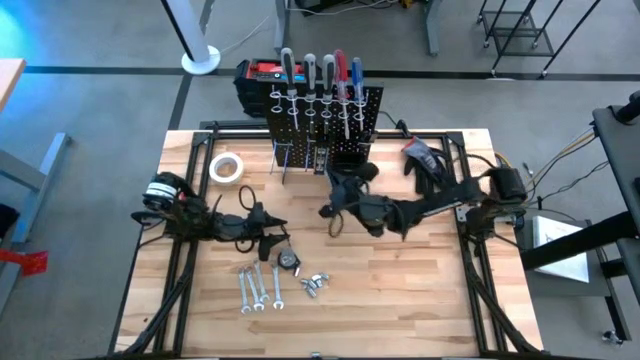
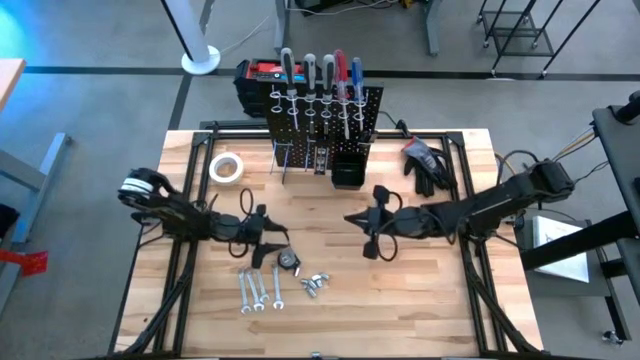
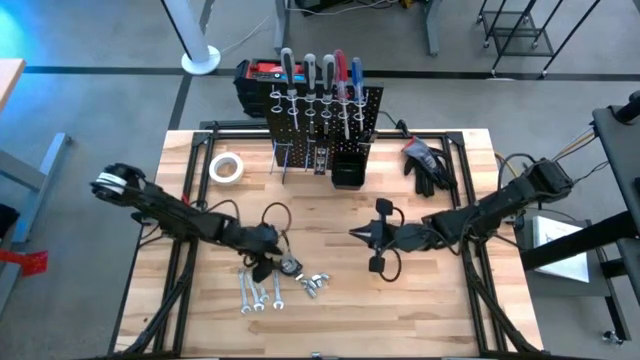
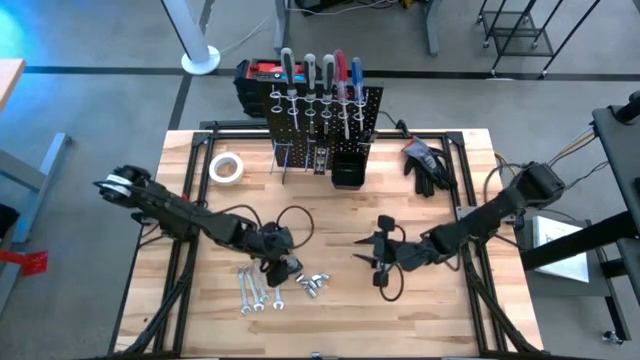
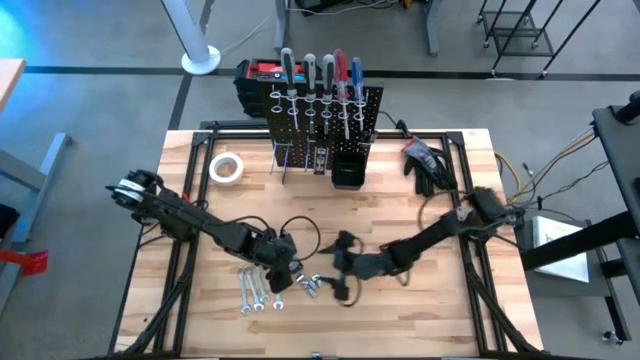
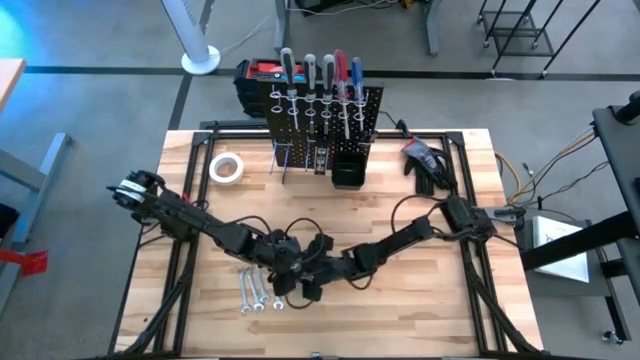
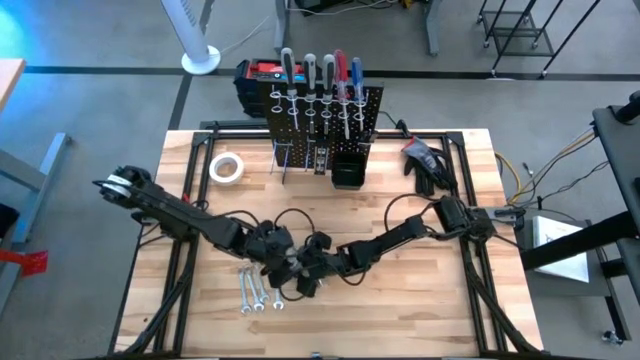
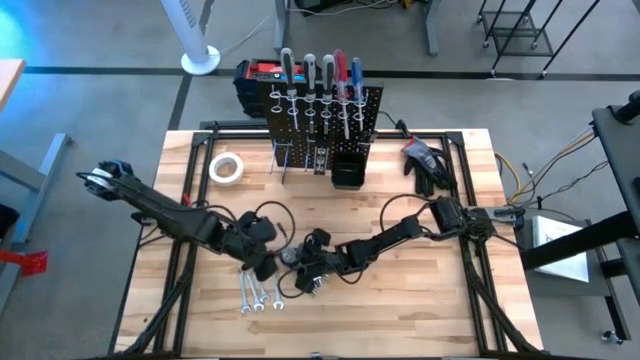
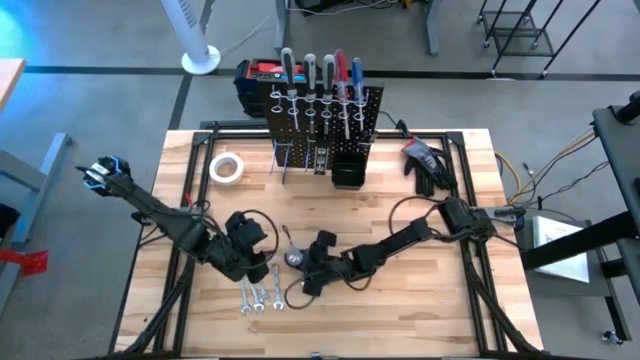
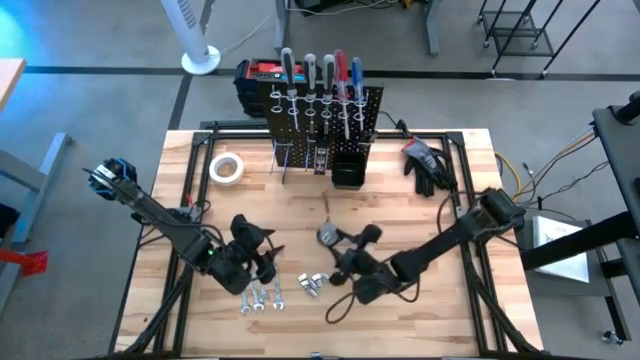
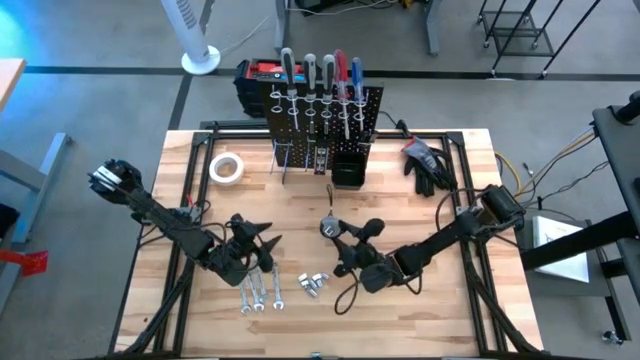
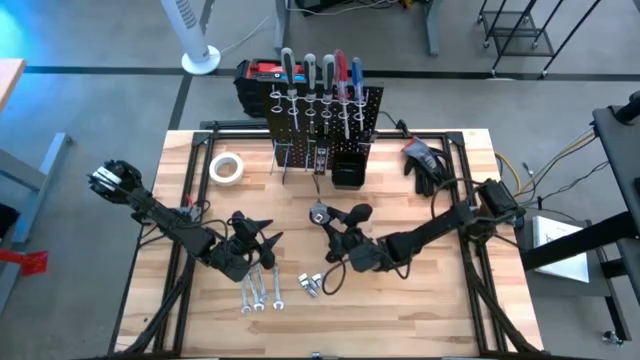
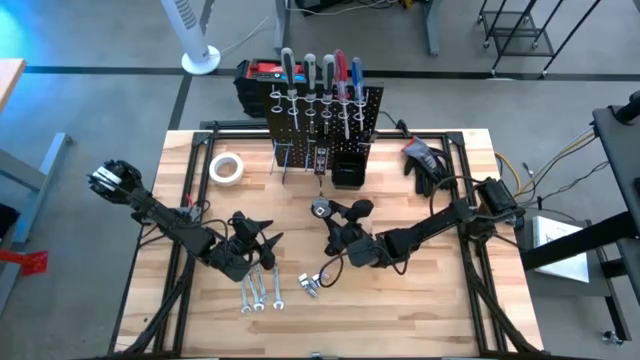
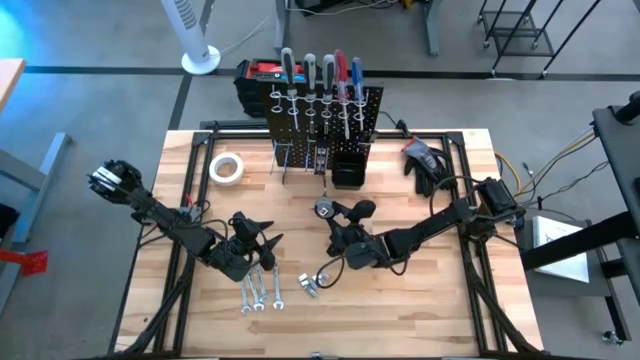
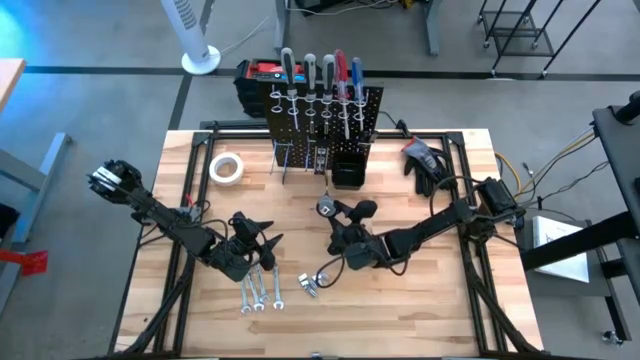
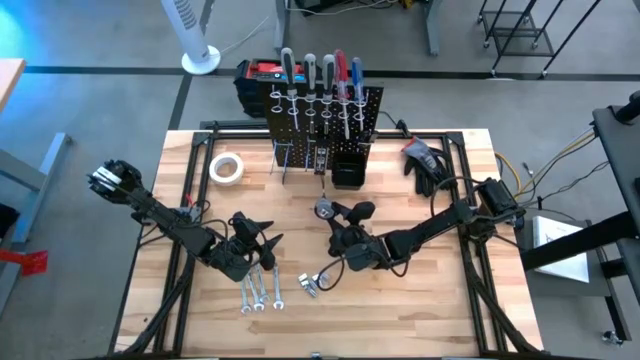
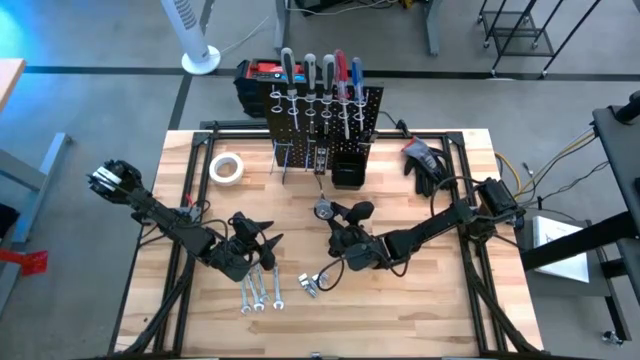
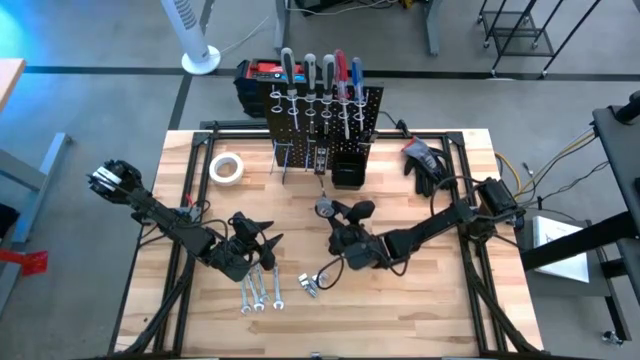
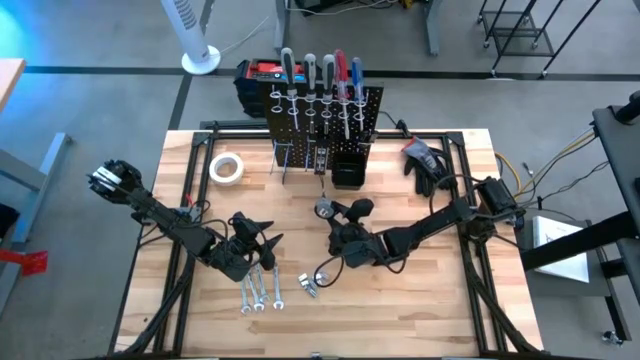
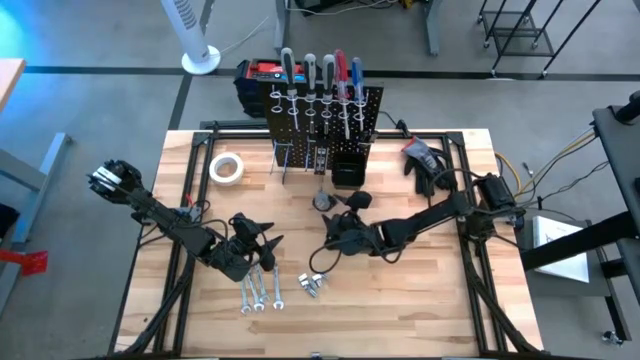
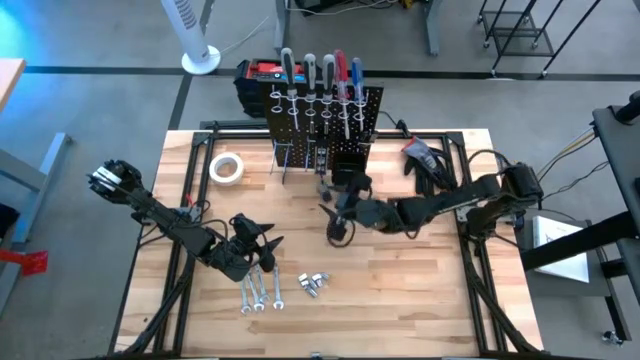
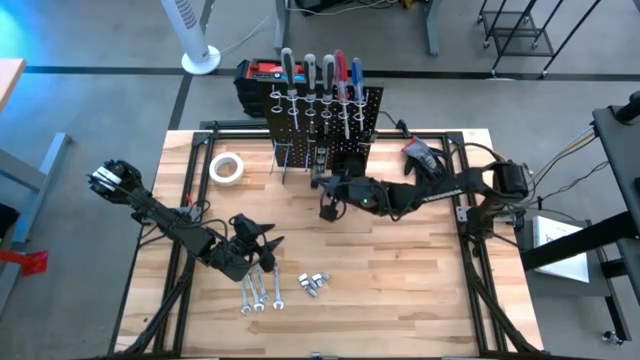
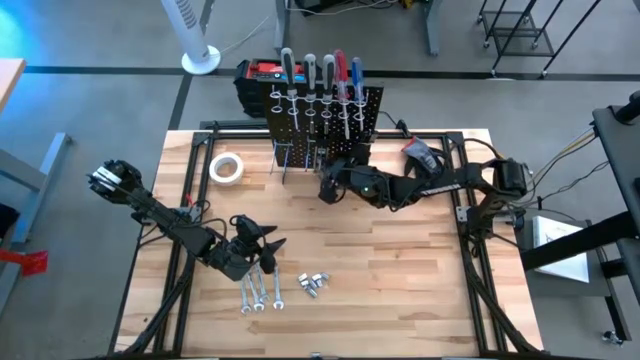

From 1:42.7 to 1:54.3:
Task: Hang tools onto peg board
Hang the gray measuring tape on the pegboard

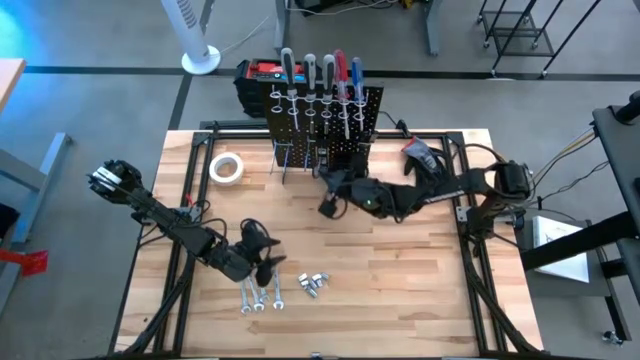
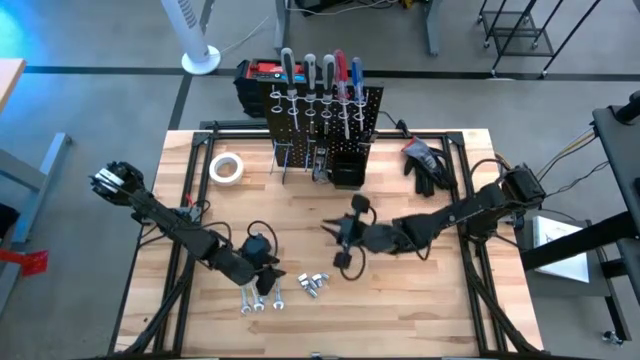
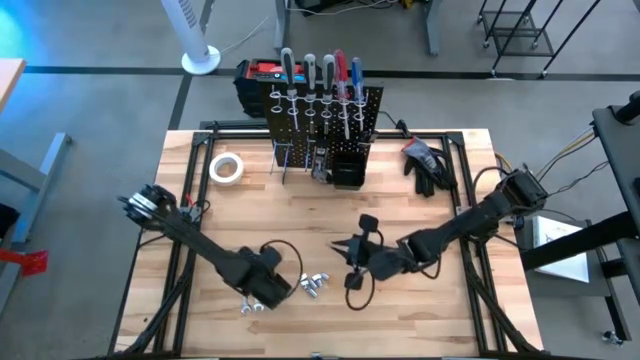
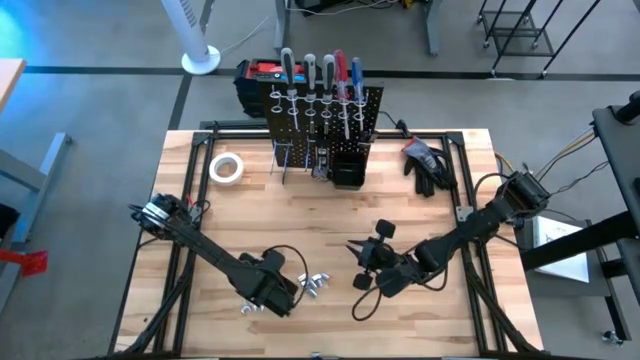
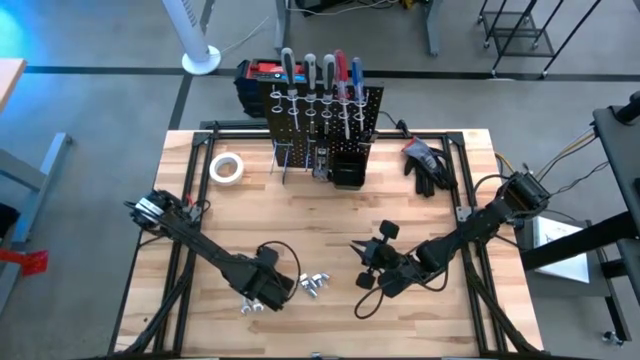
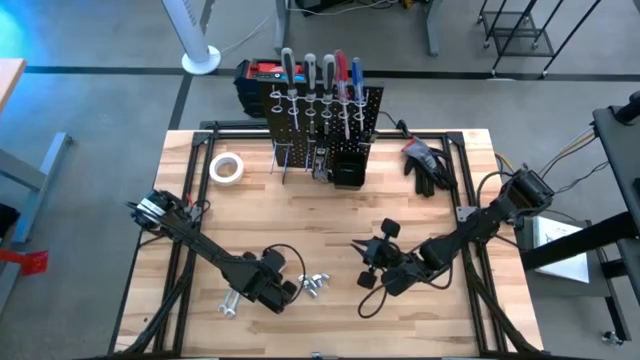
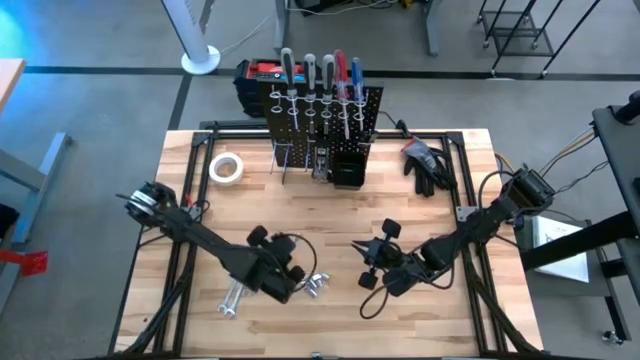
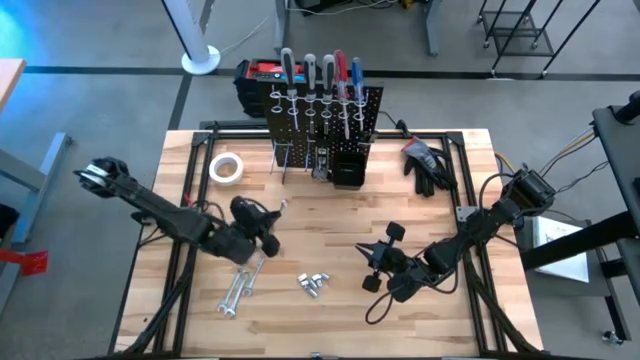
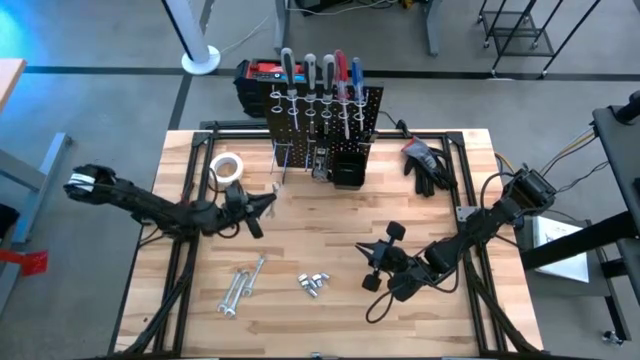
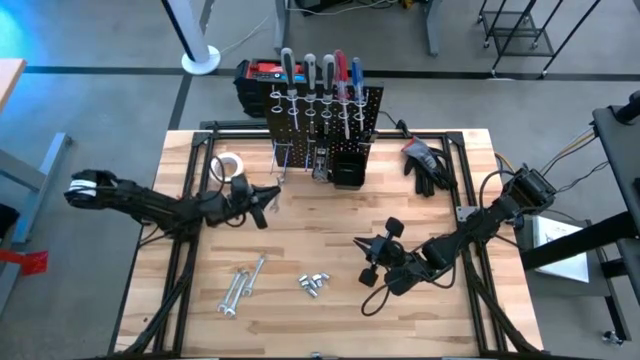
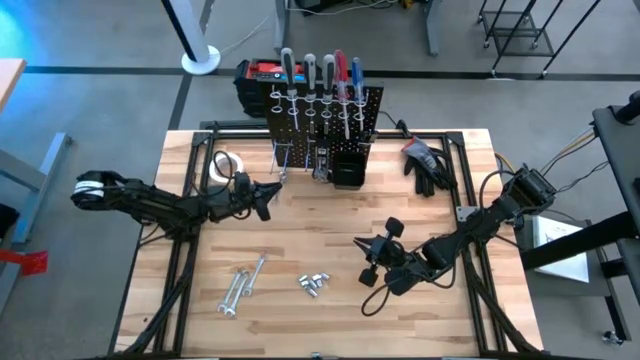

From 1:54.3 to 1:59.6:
Hang the left wrench on the pegboard

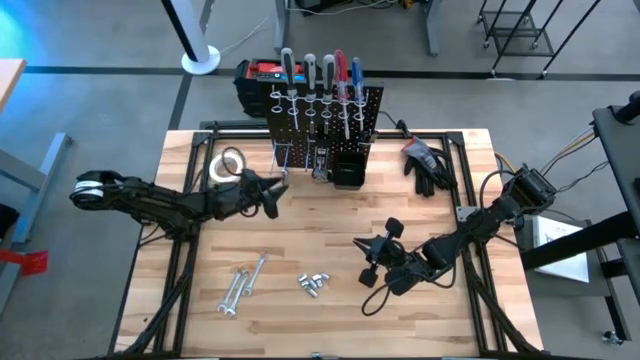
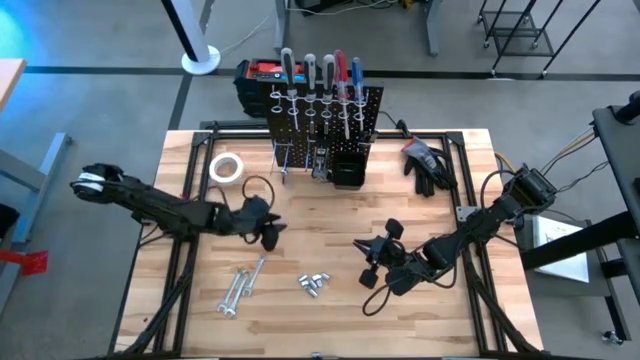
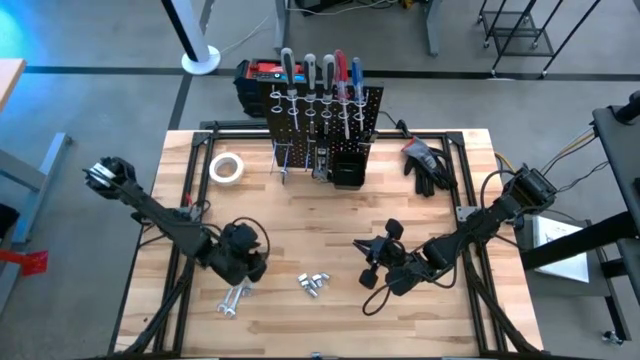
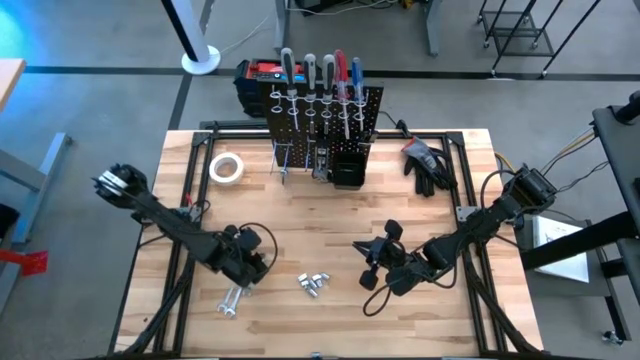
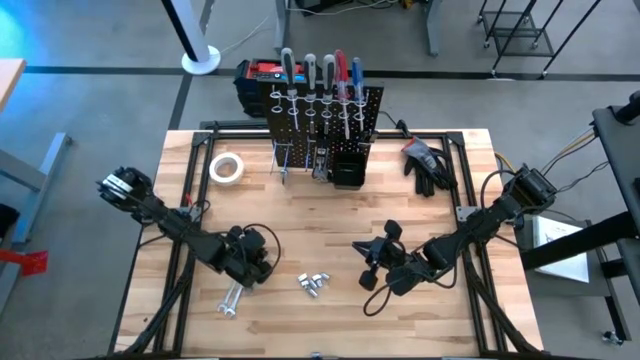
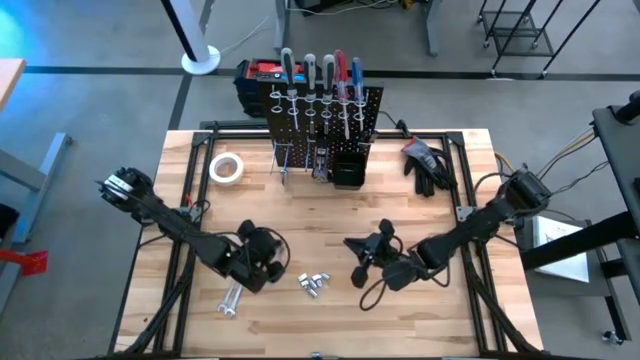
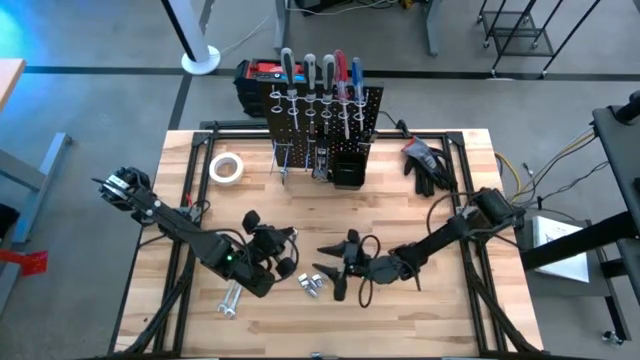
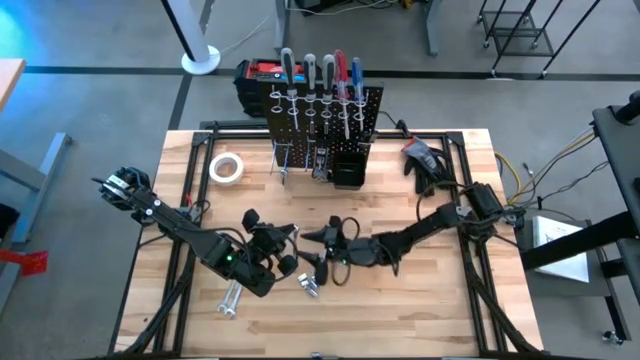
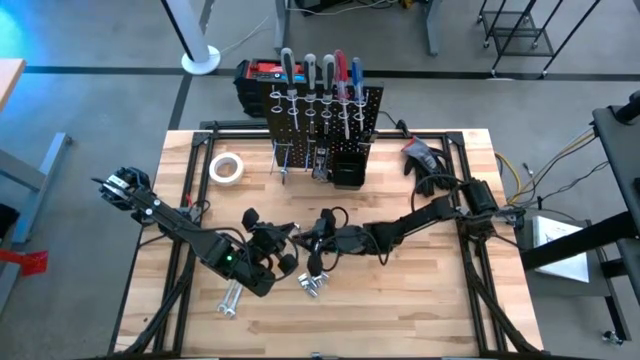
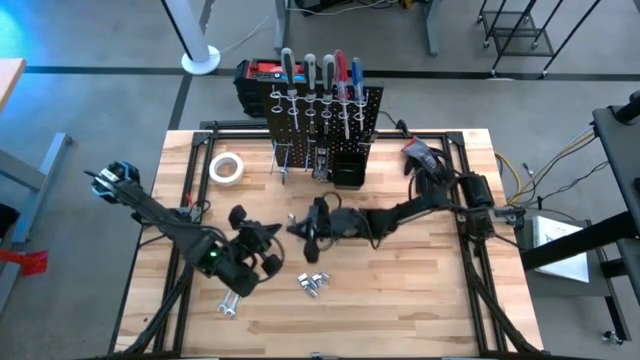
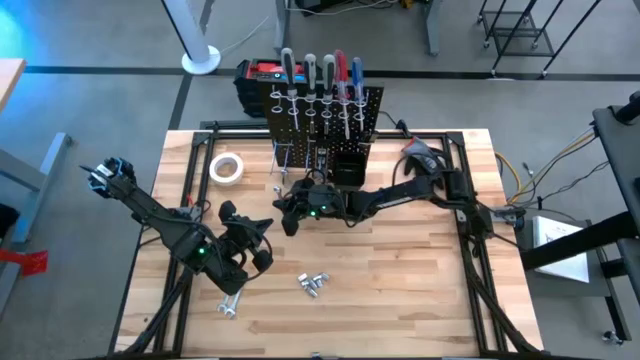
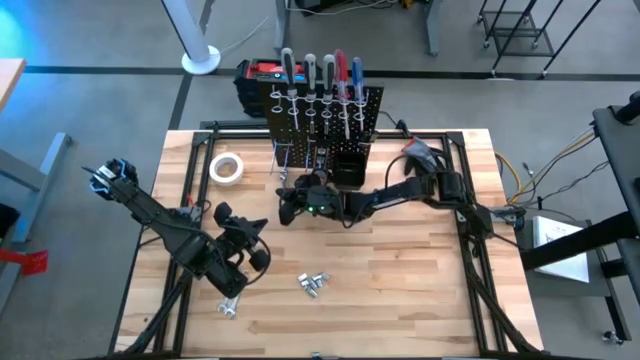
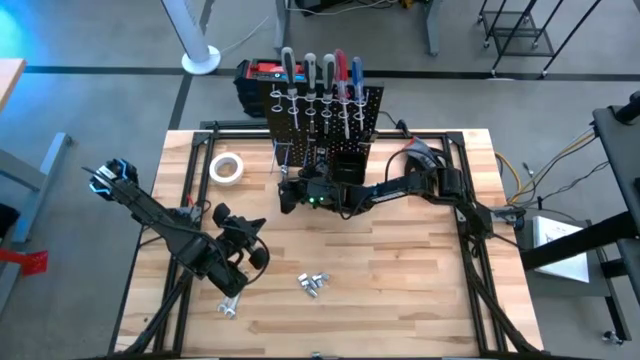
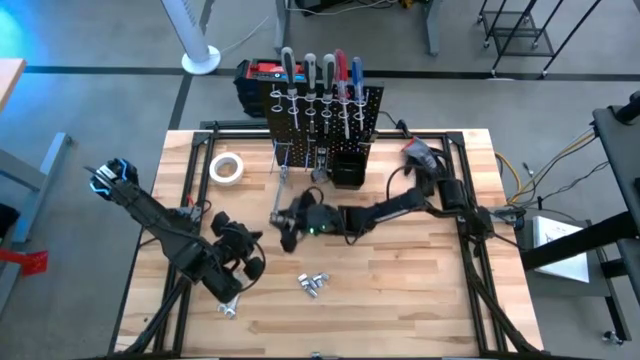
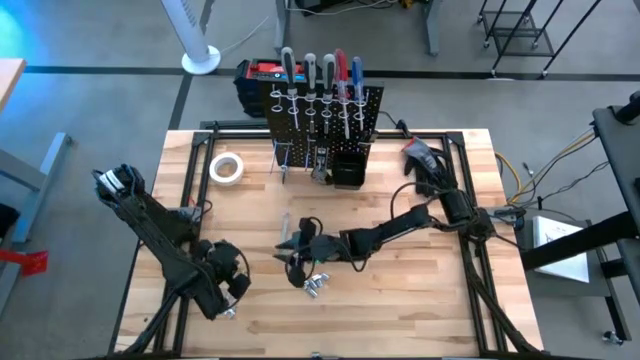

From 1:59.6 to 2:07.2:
Hang the left wrench on the peg board
